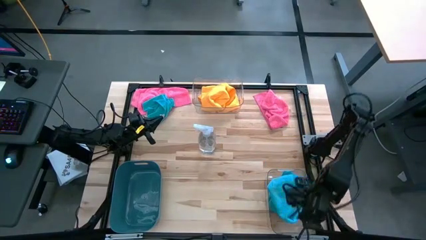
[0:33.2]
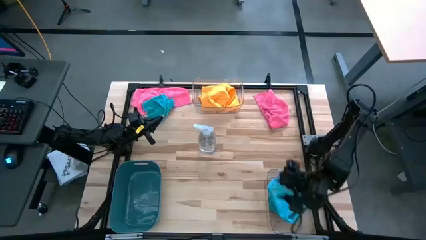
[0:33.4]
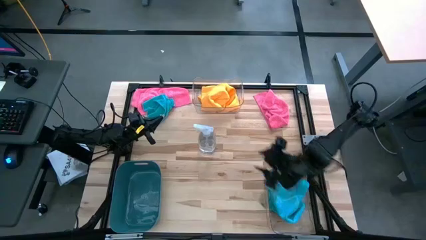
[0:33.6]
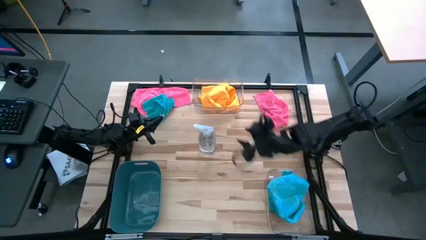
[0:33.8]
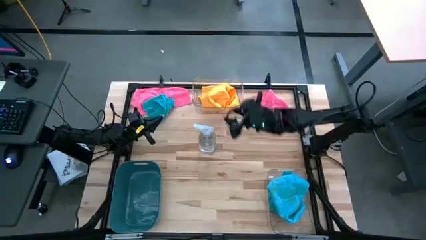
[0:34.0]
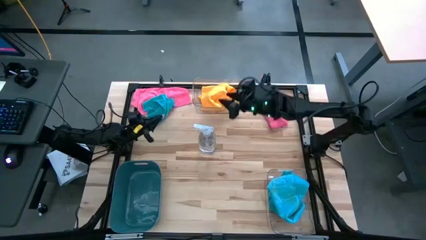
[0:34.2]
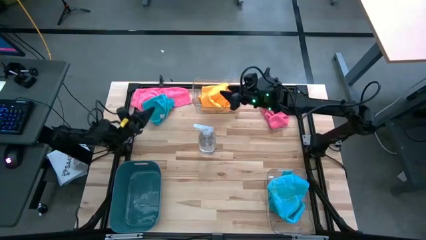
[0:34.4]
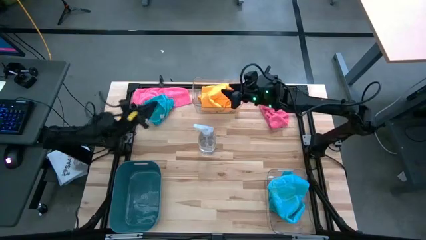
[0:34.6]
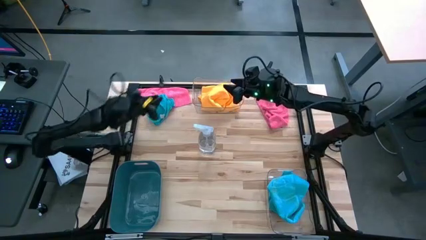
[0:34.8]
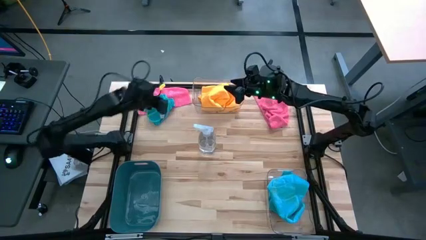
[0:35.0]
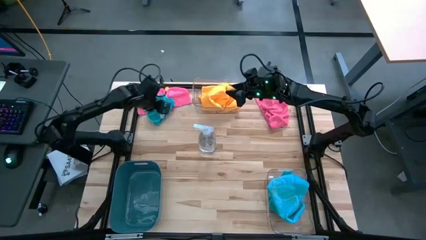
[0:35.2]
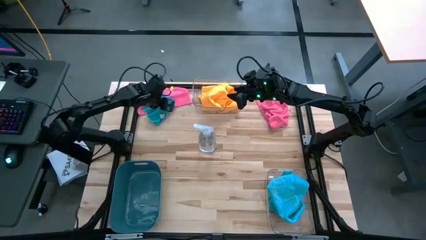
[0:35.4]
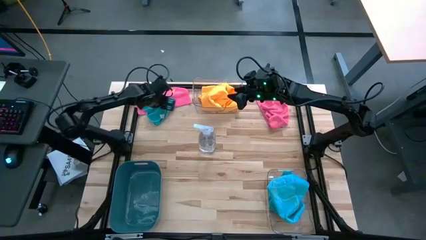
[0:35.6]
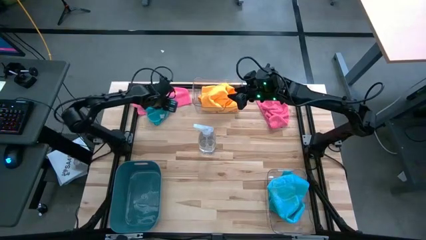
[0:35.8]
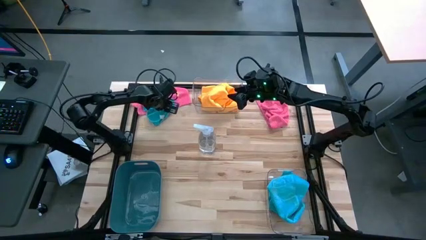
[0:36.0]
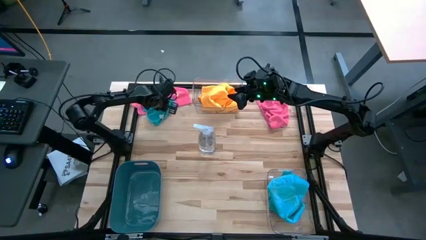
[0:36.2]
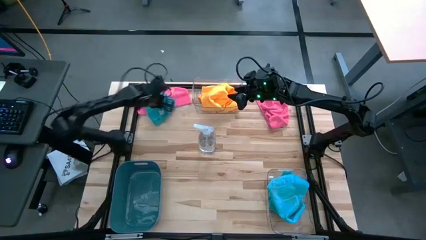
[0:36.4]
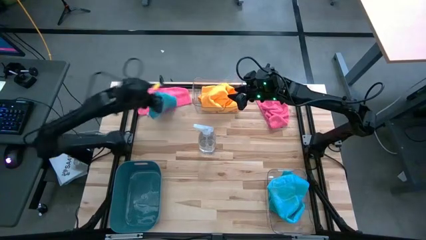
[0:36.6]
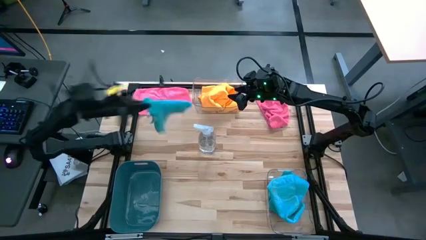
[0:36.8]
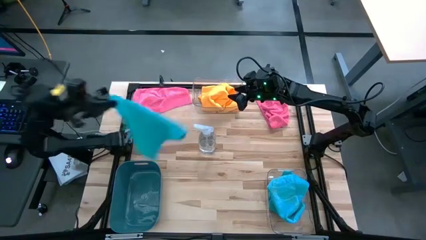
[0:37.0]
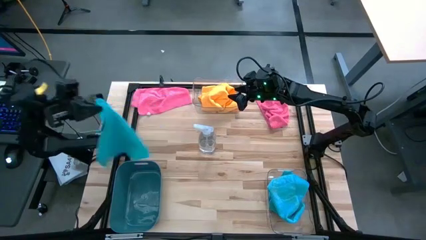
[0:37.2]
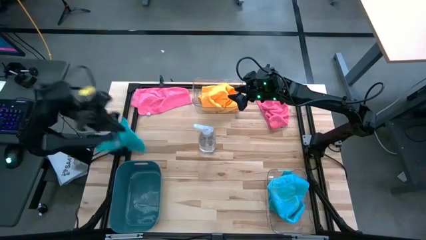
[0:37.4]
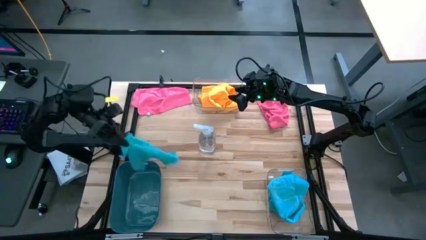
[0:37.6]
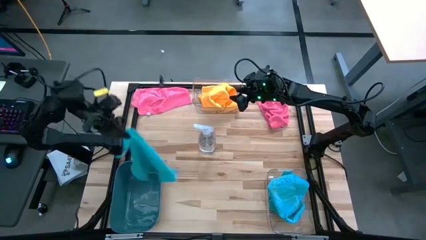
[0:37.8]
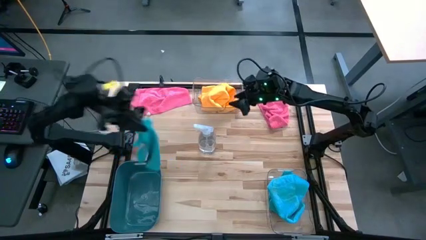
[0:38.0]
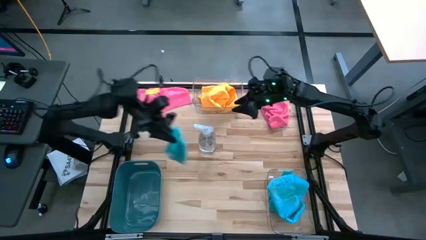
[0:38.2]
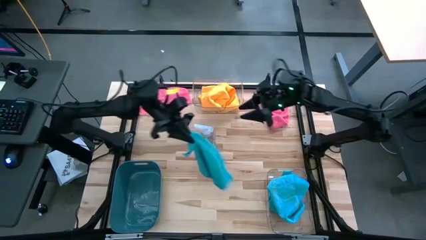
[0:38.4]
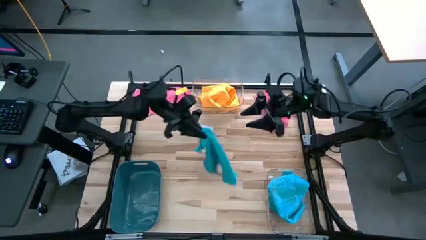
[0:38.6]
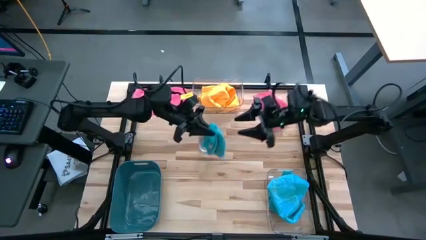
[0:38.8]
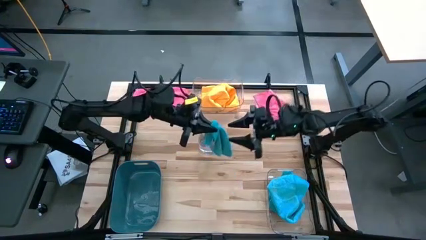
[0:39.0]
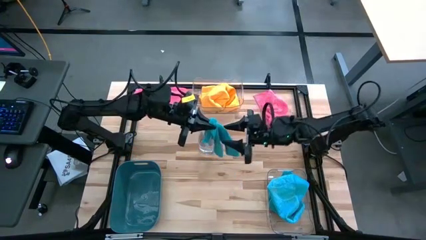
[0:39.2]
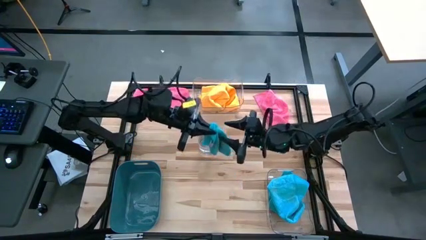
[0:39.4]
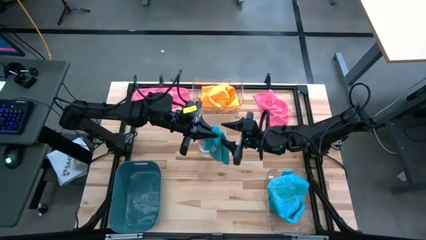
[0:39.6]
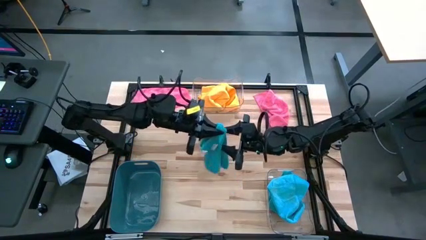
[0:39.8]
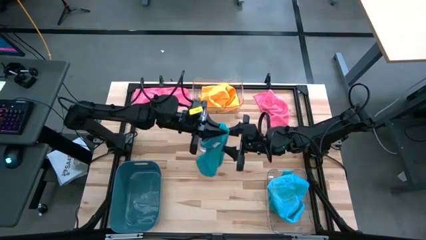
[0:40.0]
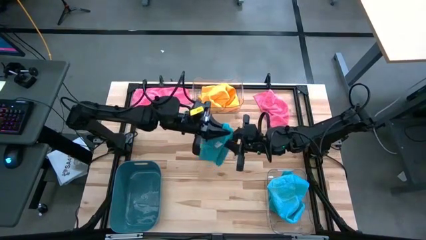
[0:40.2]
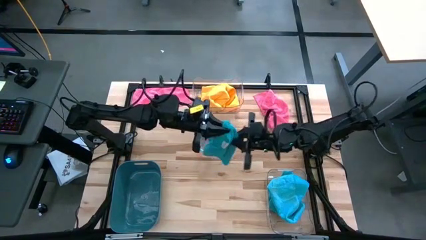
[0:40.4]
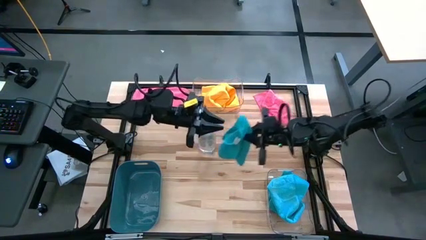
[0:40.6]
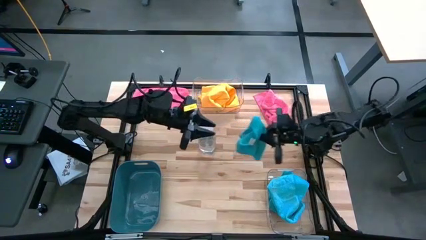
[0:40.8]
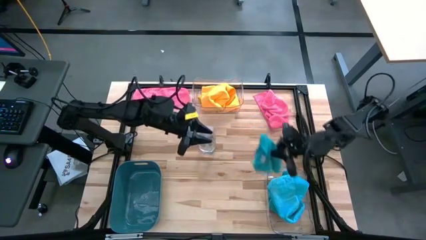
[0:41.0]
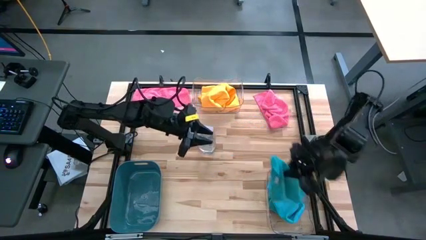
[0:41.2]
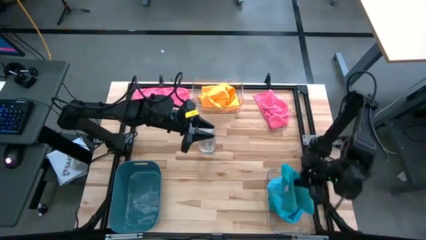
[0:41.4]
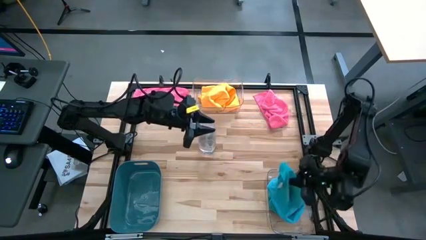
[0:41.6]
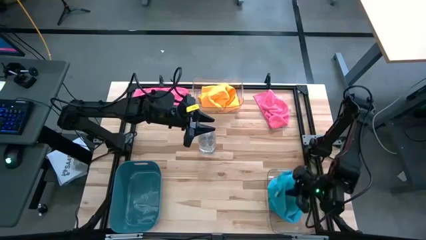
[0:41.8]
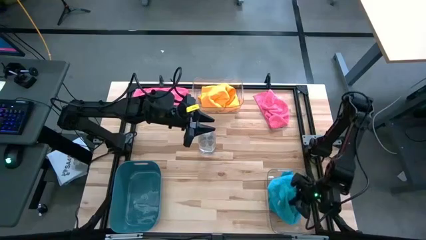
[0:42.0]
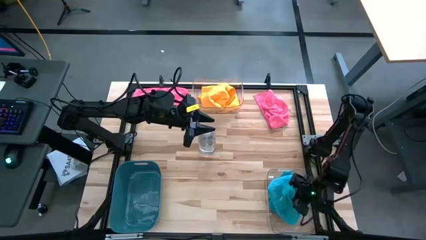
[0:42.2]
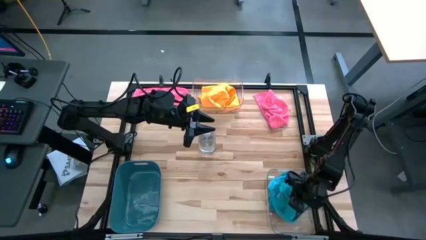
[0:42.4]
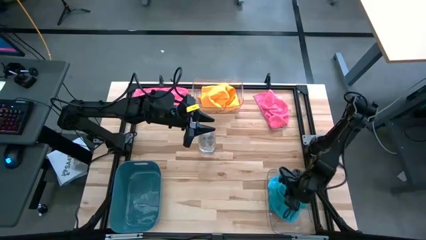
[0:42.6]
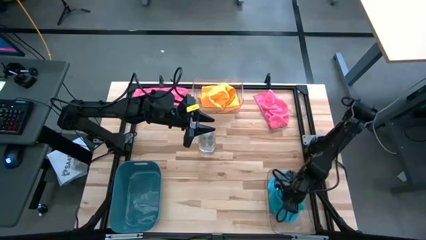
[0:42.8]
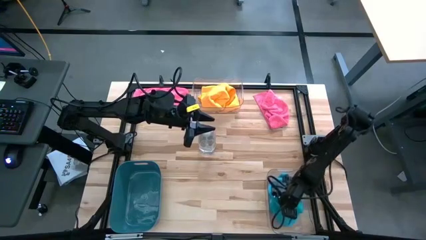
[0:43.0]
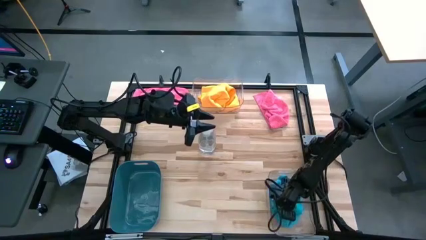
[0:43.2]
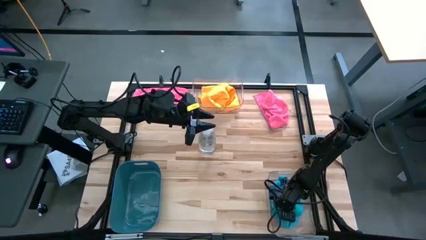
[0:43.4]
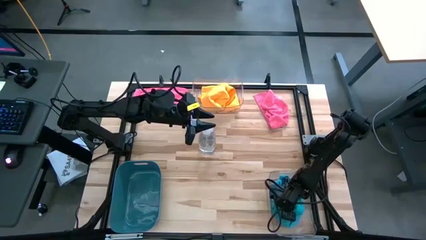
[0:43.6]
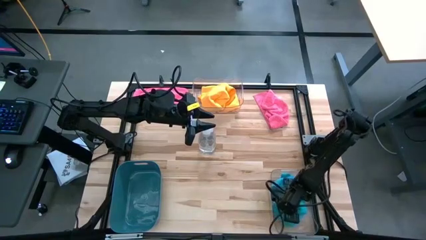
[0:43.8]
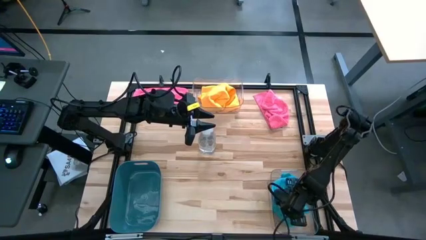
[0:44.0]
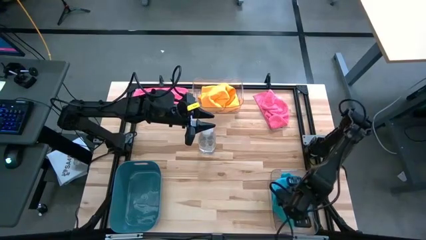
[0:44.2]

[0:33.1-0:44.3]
Task: Sort microfiber towel by color & place in baskets
Put the blue microfiber cloth into the bottom transparent bin

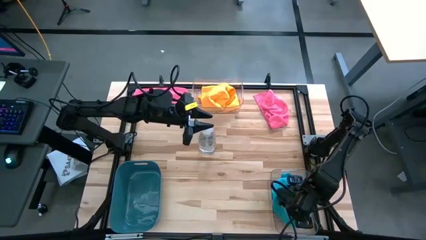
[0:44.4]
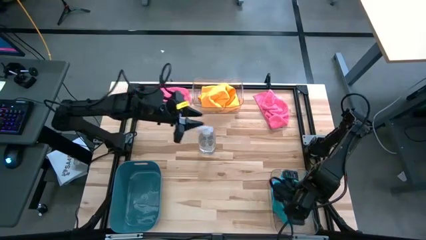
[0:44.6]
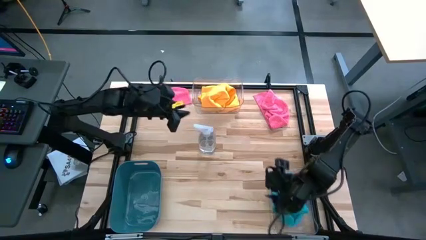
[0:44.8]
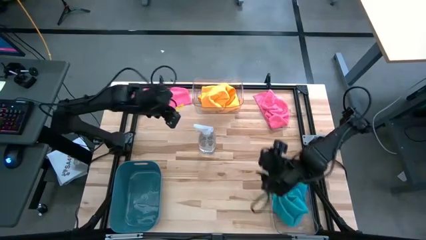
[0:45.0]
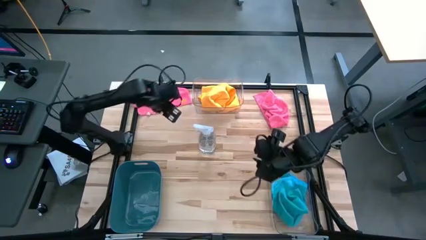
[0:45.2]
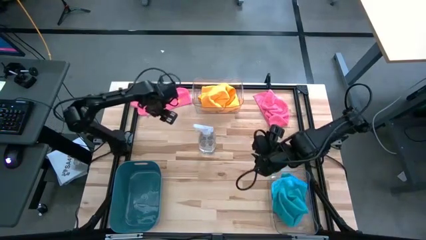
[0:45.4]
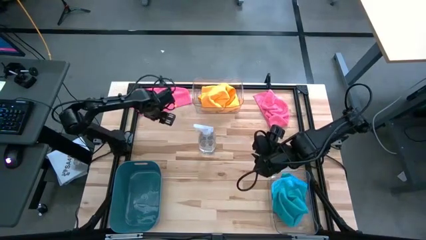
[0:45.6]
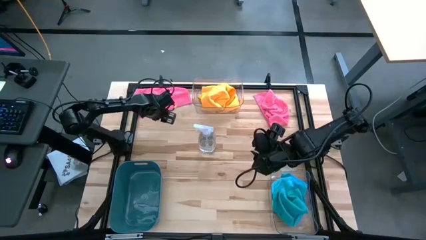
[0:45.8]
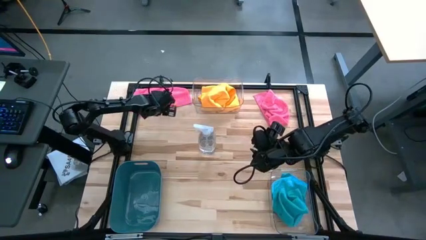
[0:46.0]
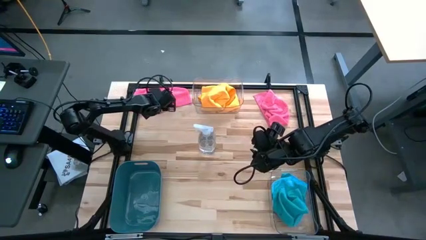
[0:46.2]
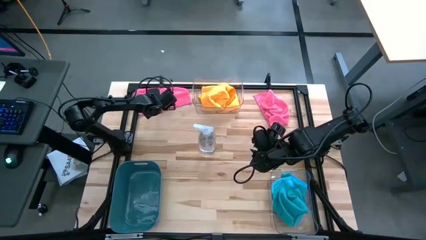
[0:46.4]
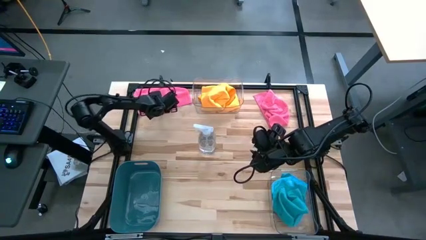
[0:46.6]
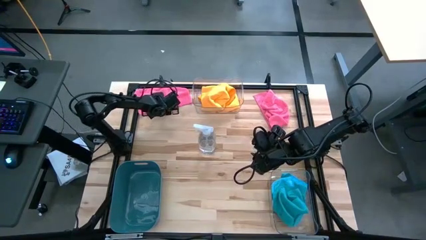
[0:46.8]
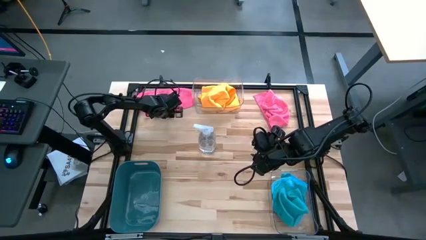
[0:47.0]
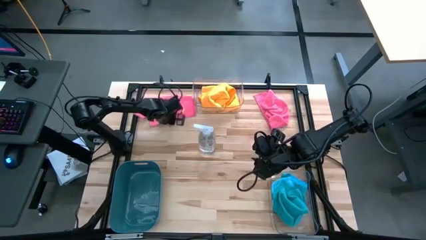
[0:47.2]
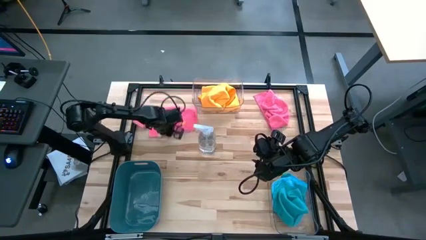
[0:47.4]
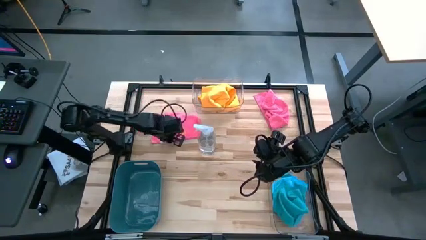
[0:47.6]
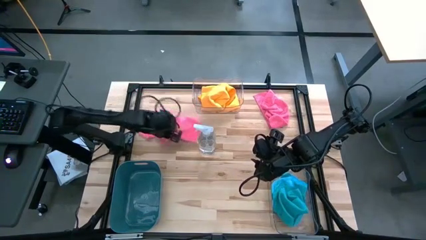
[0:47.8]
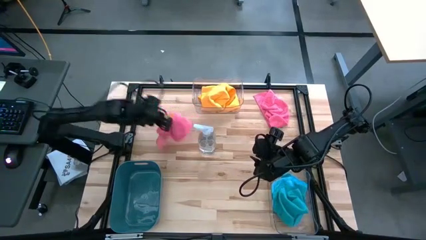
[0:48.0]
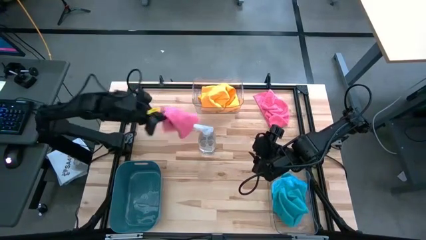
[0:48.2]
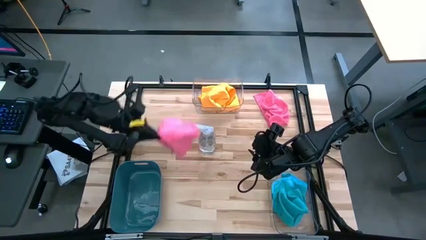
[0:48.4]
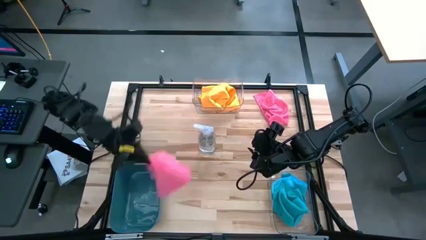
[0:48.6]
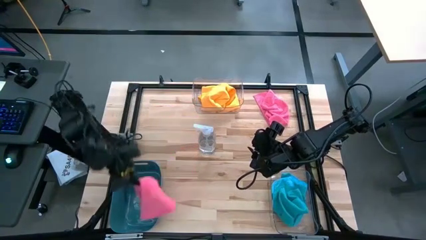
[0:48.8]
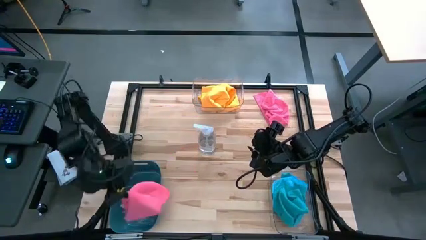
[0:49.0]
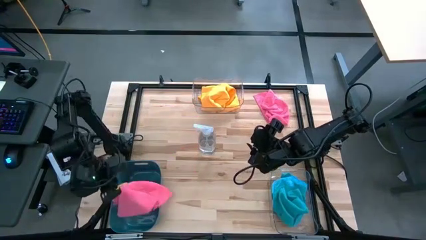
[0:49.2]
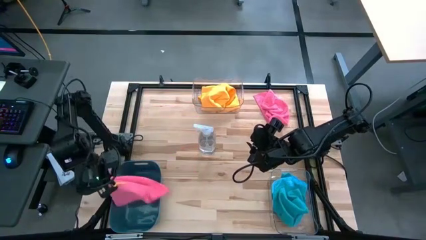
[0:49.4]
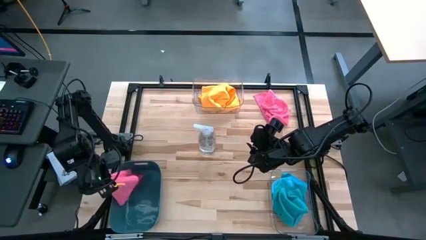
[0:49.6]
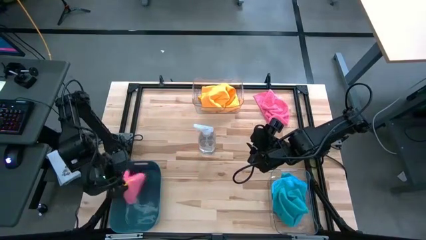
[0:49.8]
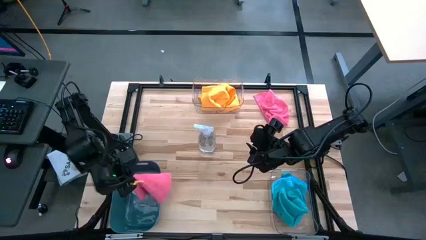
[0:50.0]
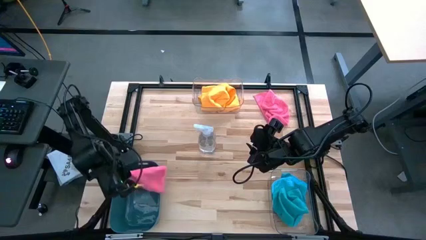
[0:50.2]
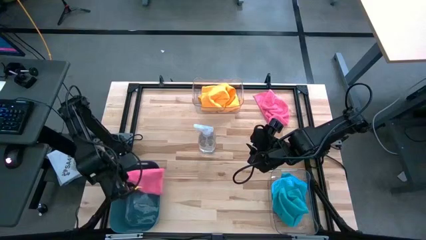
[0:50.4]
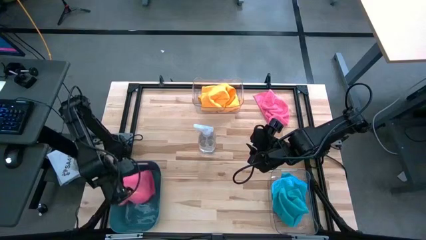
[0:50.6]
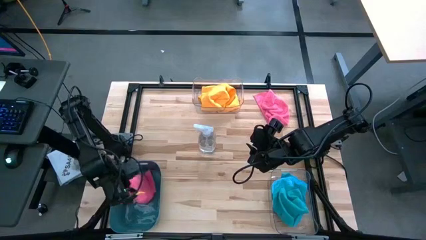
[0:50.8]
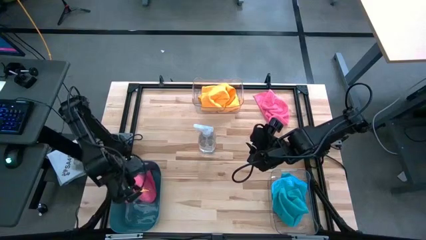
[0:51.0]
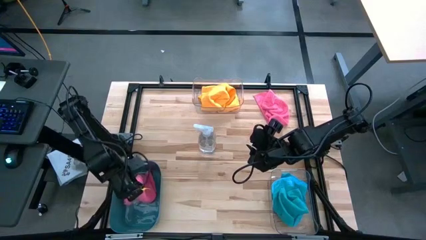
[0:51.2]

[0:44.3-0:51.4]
Put the left pink microfiber cloth into the blue bin
